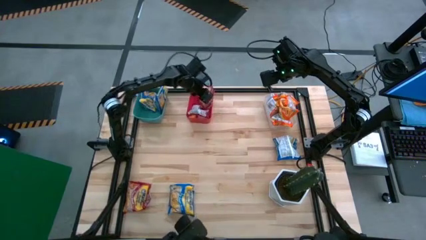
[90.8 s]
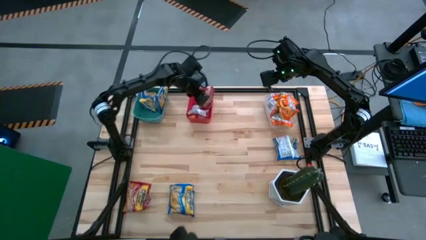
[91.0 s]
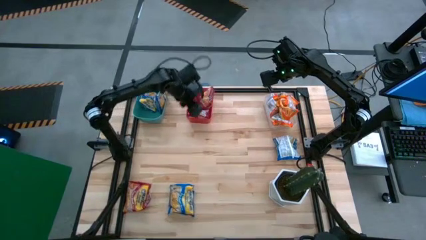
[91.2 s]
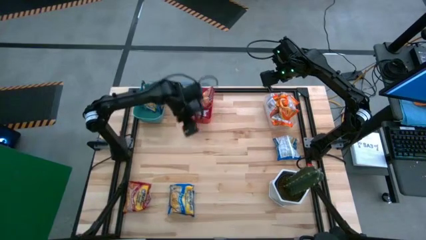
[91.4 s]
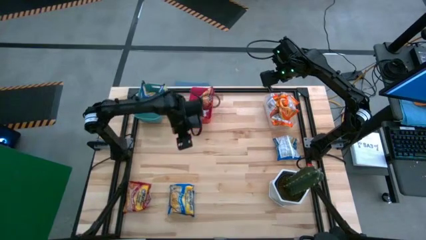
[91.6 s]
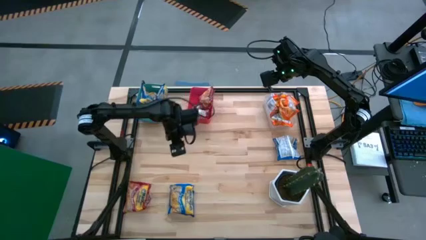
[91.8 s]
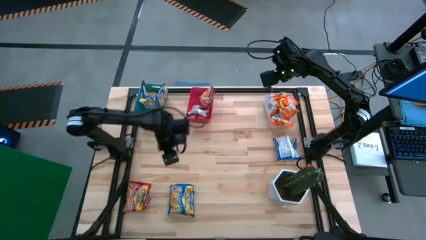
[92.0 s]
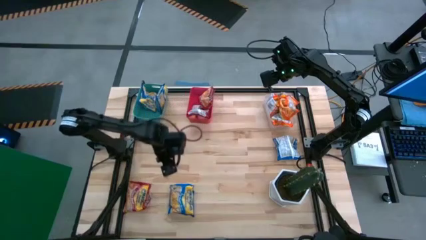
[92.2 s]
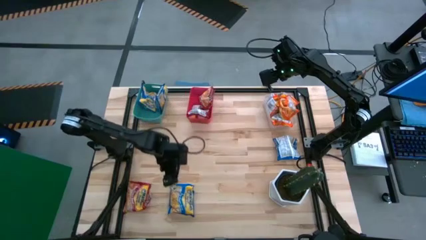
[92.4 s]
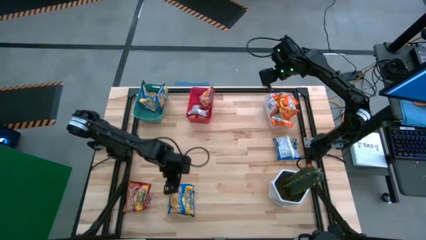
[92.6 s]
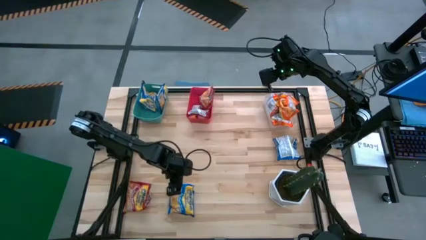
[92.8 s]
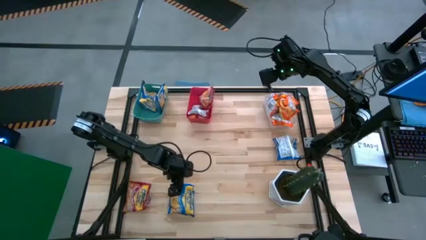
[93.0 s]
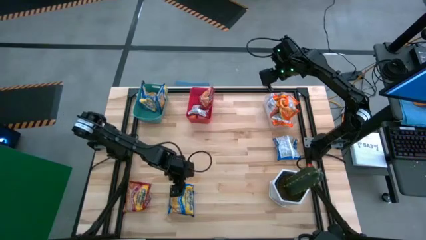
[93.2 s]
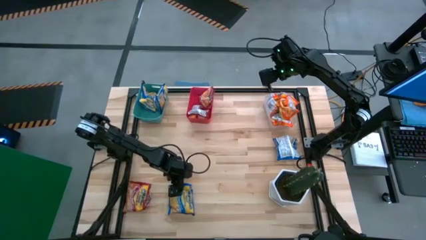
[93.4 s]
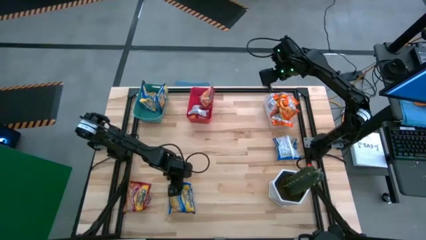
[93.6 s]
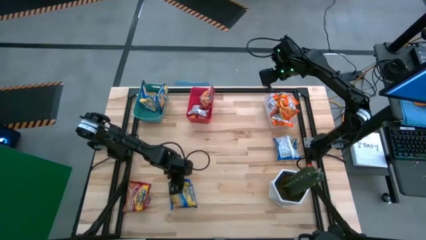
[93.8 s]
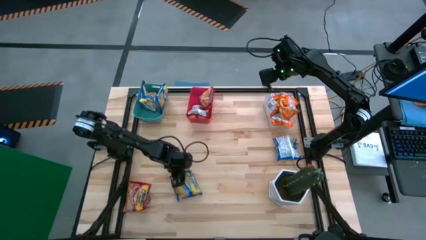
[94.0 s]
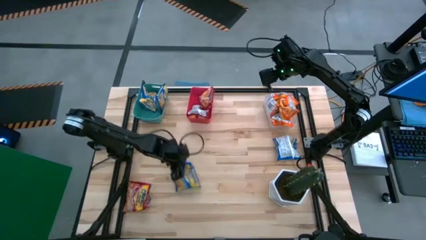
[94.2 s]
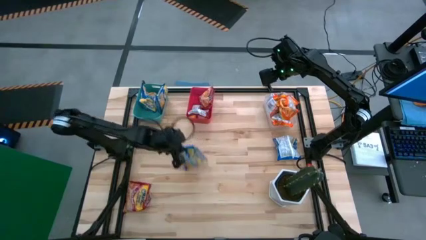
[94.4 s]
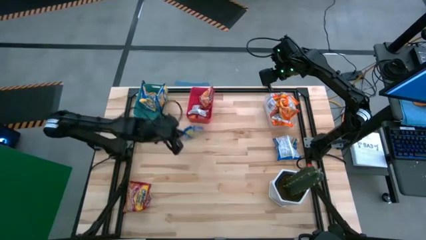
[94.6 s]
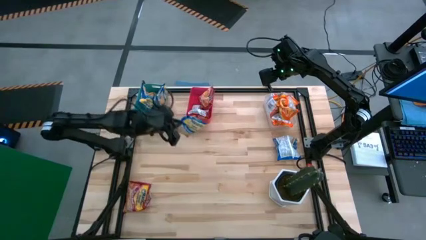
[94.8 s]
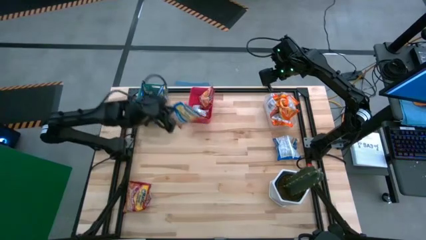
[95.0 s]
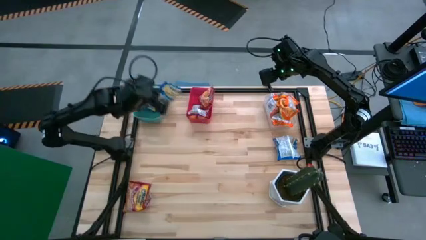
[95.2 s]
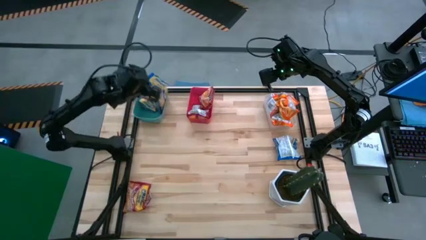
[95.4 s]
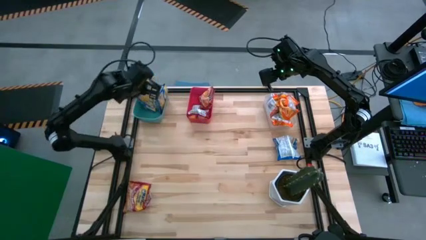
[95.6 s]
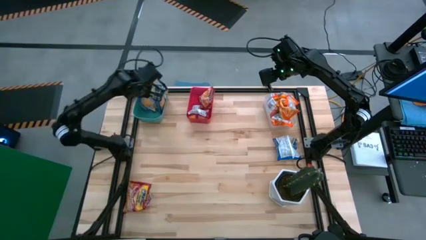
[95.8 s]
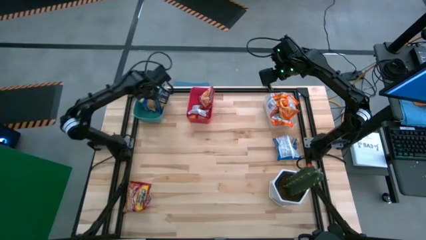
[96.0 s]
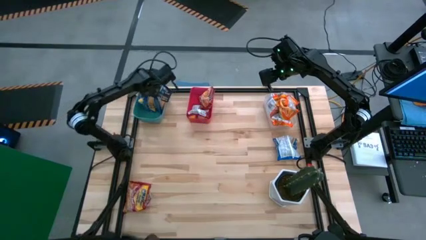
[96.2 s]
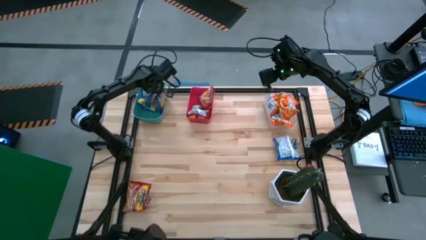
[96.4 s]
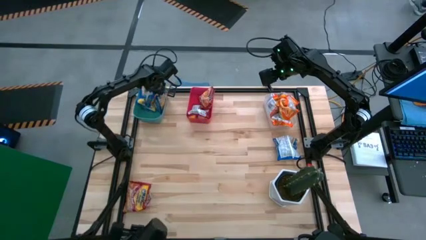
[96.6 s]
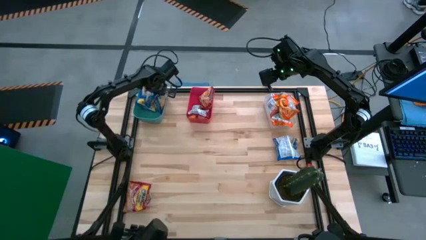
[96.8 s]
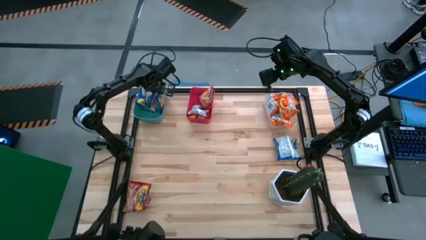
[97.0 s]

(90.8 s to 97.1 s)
Task: Sort Maruchan noodles
Put the blue noodle pack into the green bin

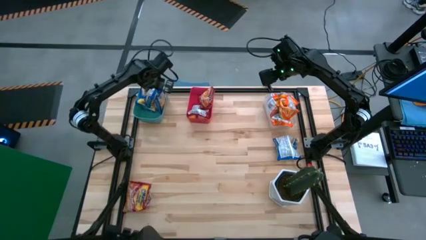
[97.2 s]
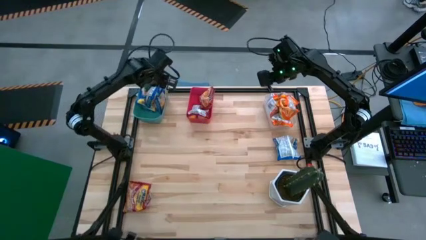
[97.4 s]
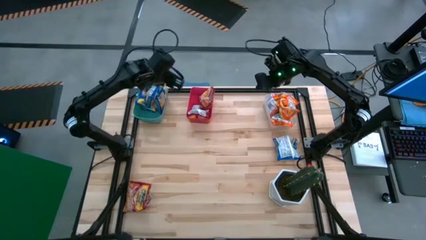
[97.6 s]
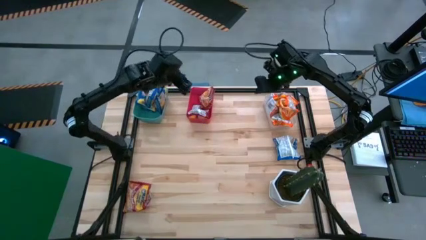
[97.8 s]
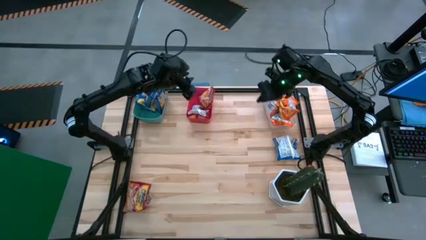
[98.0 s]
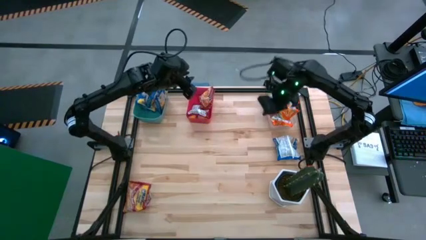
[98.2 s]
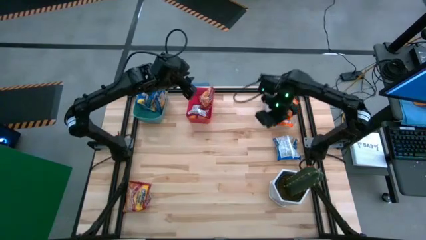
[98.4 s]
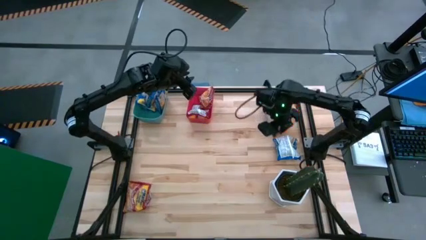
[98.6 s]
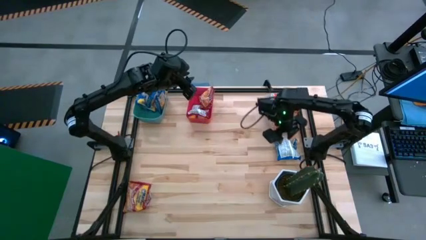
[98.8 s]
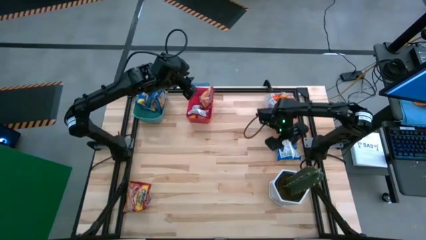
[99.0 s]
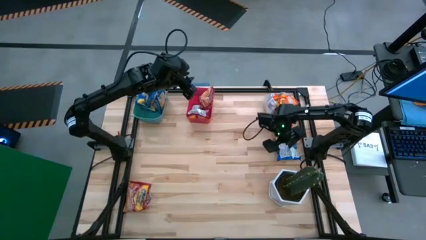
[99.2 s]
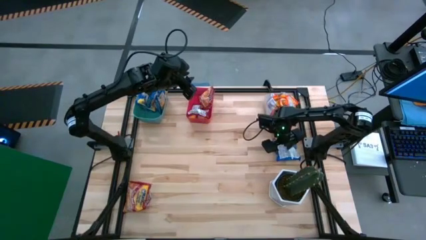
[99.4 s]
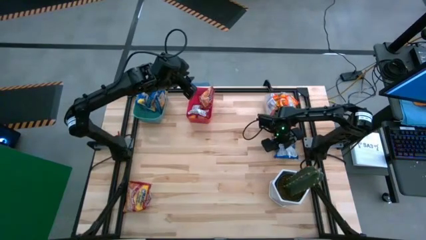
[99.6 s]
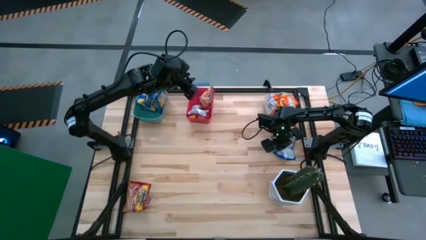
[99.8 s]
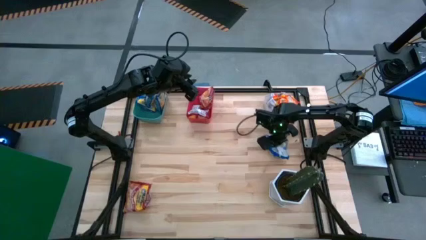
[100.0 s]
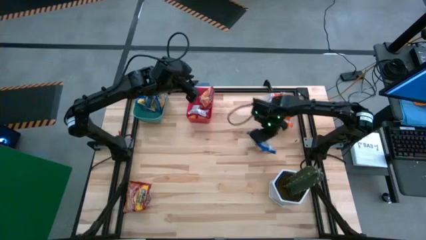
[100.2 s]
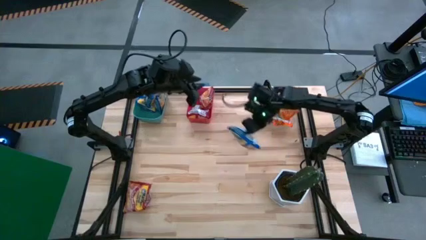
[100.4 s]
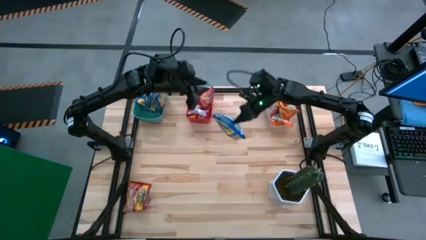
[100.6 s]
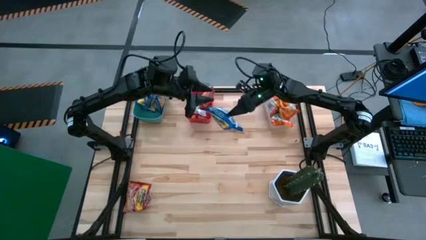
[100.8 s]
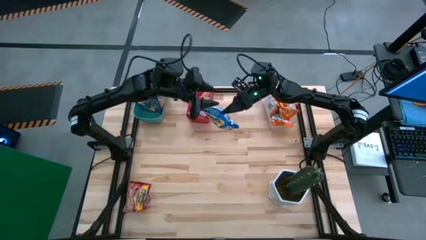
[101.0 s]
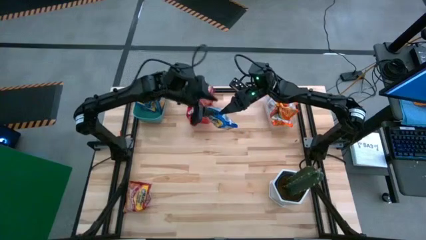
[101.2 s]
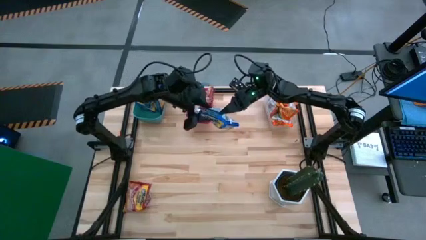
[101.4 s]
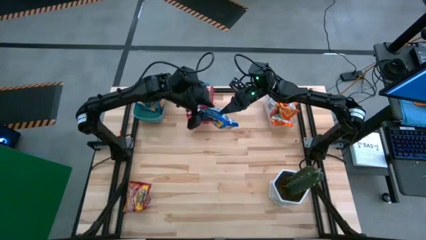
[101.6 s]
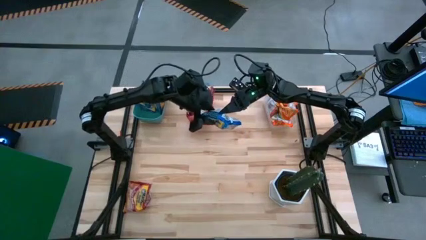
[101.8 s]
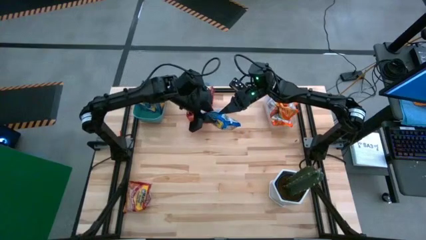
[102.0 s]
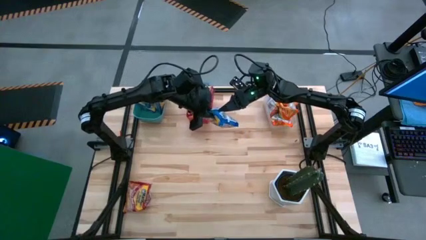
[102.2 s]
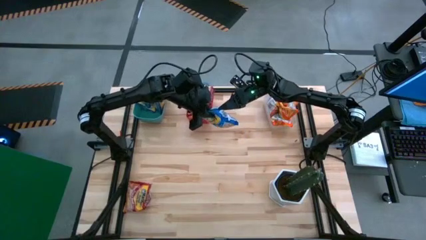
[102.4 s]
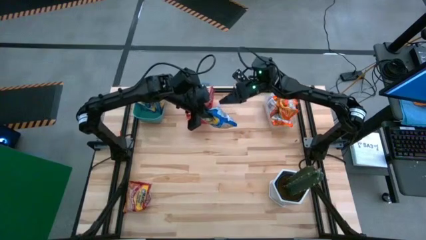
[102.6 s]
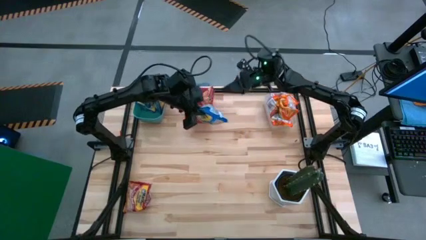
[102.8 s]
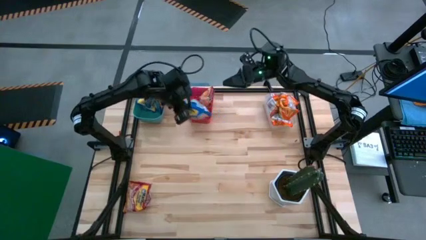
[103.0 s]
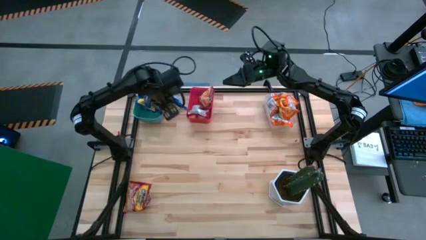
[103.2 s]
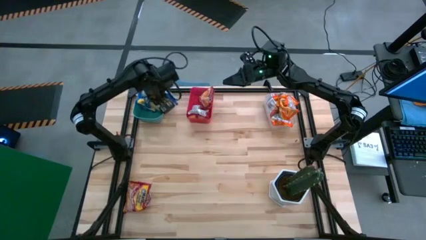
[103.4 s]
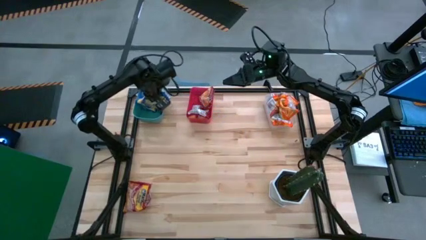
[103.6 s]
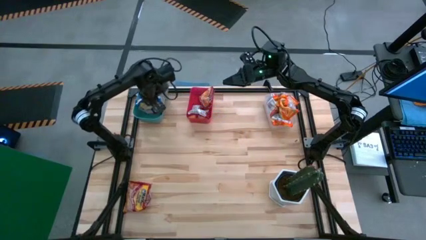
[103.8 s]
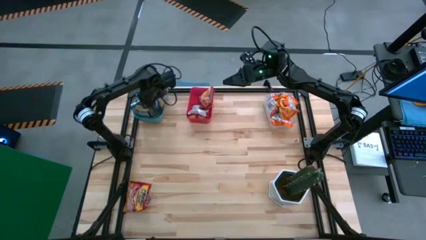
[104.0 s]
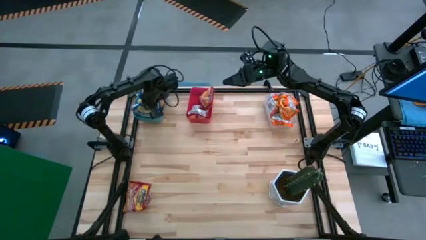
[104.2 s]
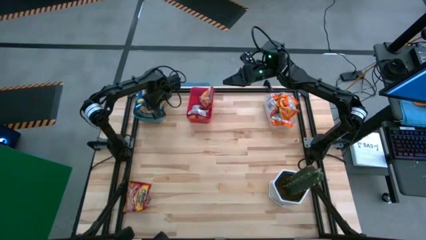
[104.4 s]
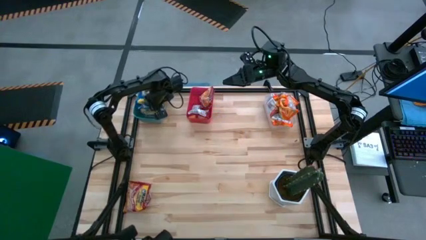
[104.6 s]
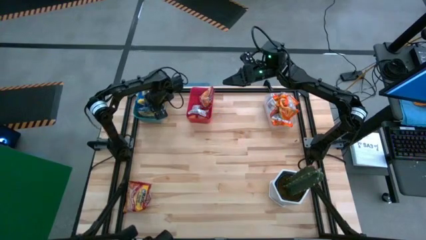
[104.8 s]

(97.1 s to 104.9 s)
Put the blue noodle pack into the green bin

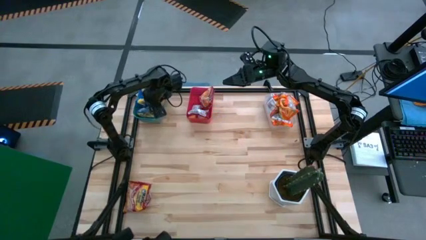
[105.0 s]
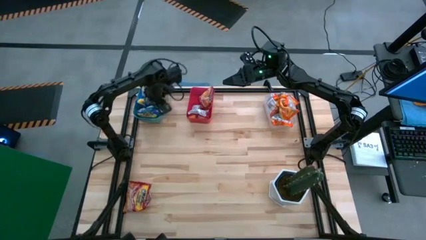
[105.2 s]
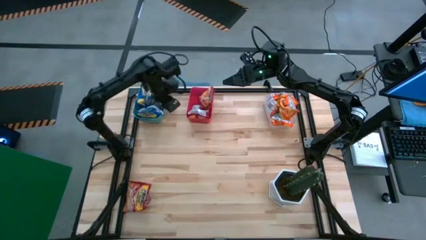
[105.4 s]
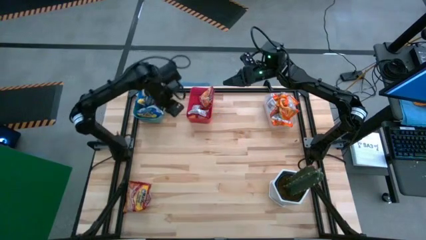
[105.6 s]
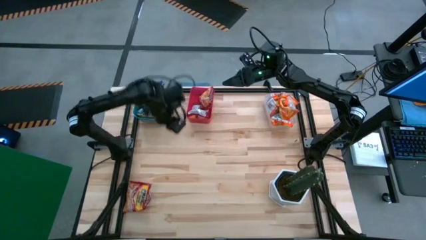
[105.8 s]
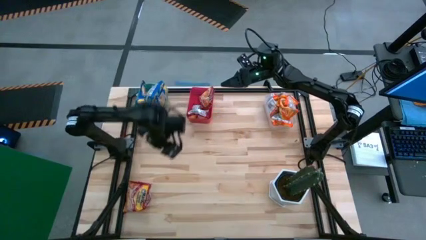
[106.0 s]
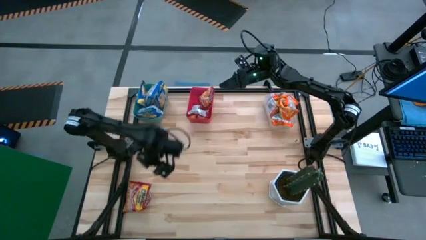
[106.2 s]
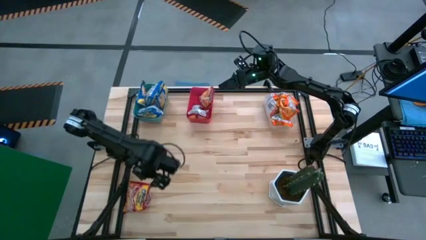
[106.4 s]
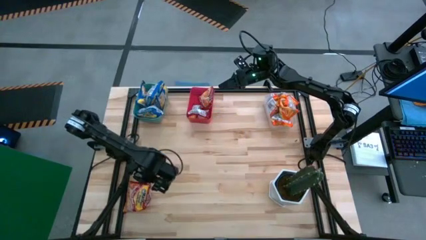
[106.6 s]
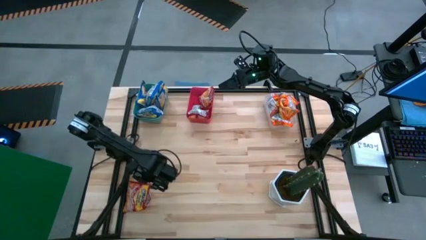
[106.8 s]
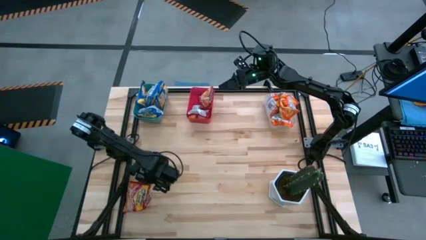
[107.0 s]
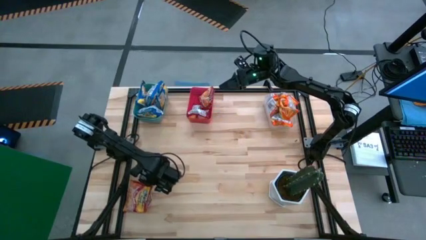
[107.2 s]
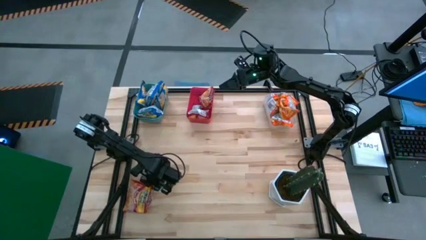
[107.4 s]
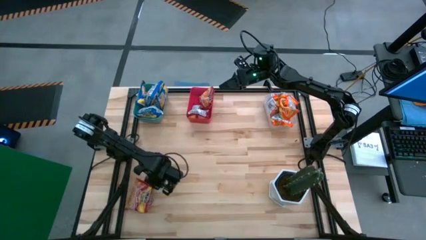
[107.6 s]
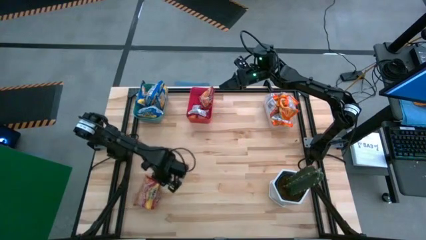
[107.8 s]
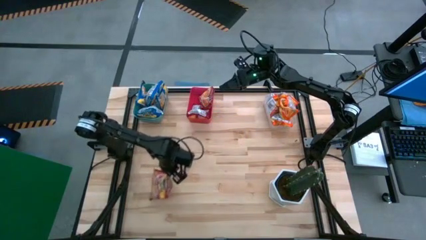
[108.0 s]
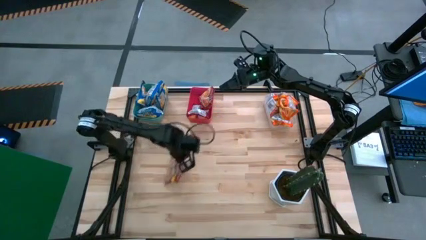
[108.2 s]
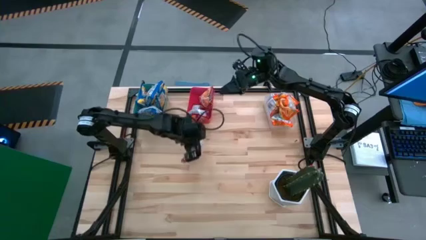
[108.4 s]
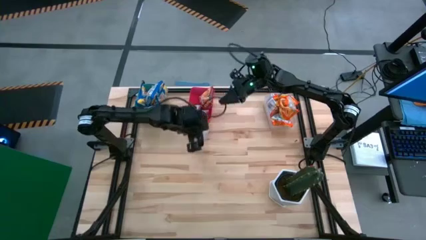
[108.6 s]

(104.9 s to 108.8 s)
Put the red noodle pack into the red bin
